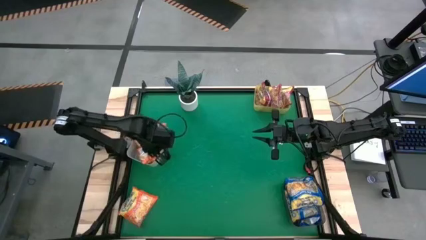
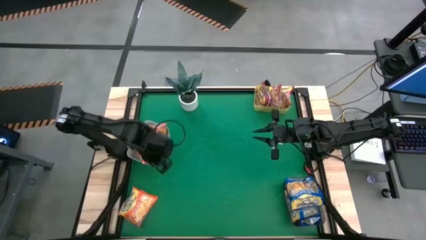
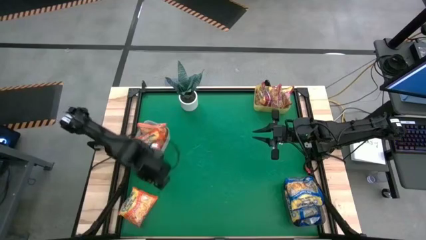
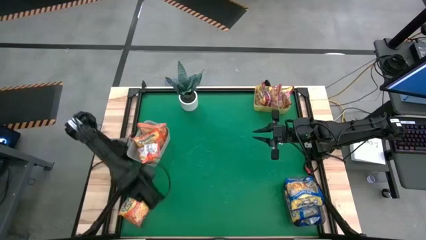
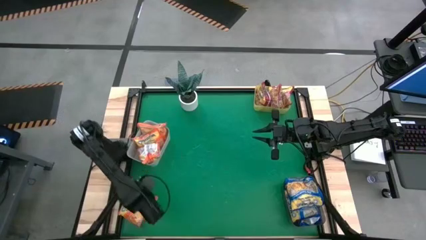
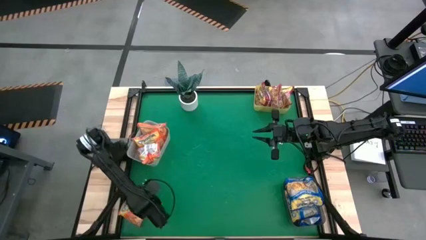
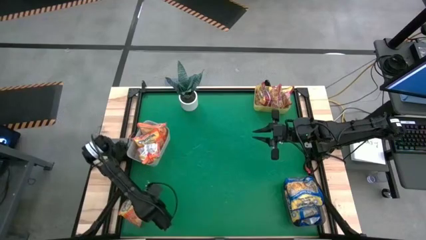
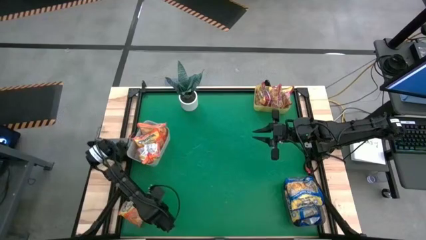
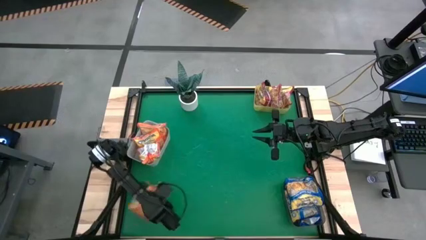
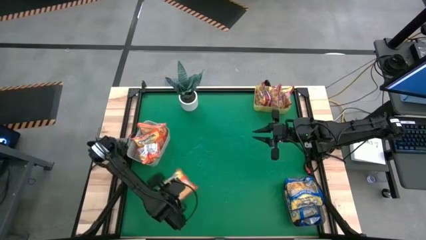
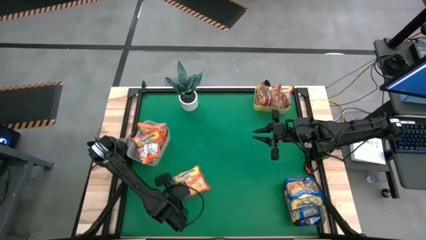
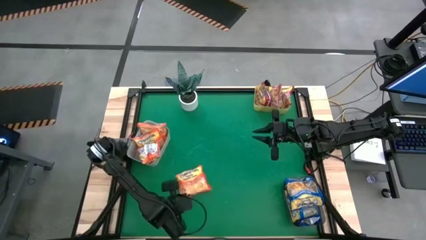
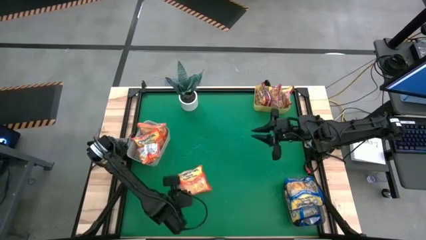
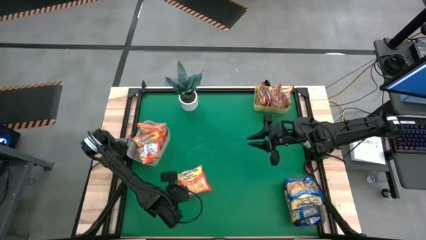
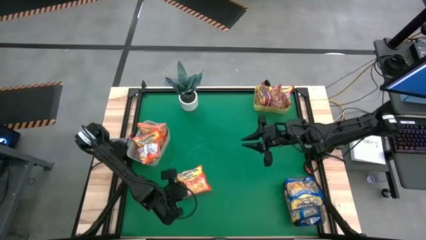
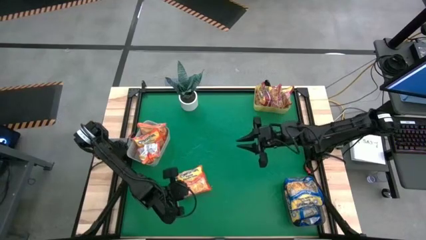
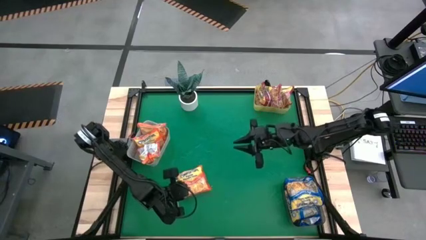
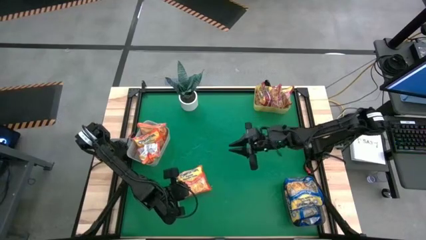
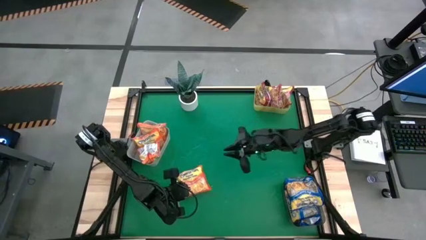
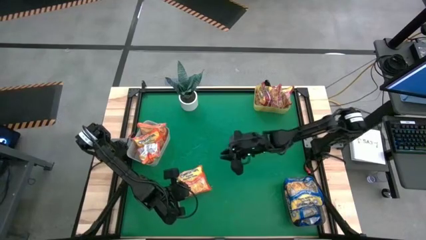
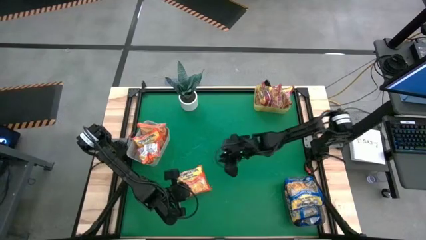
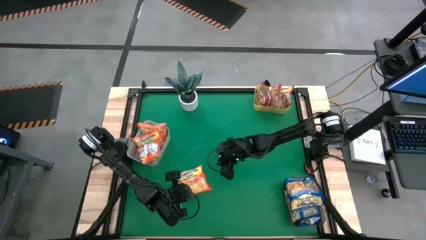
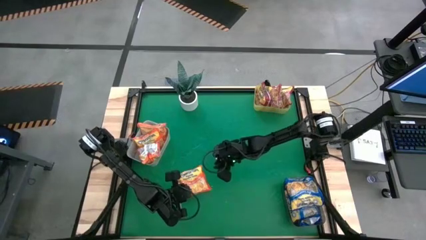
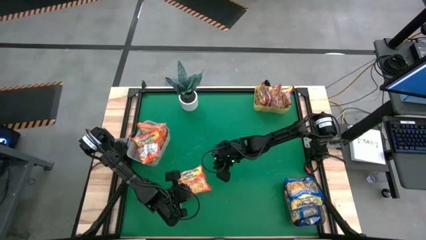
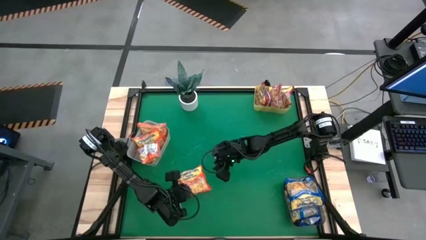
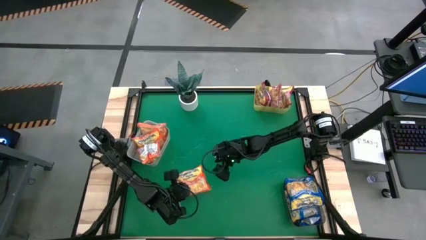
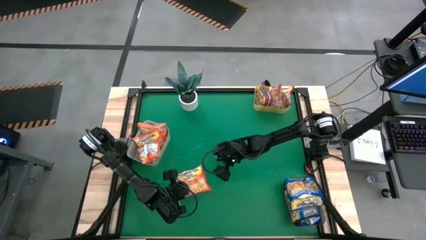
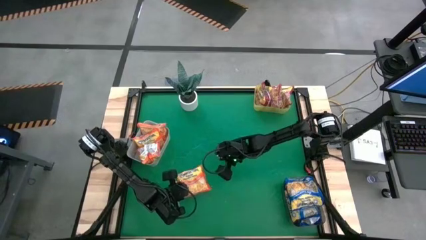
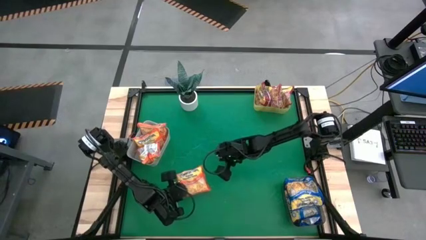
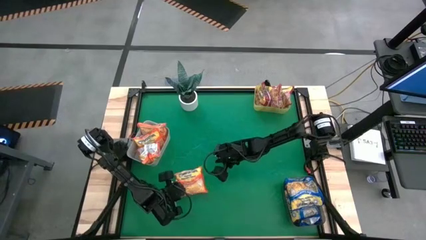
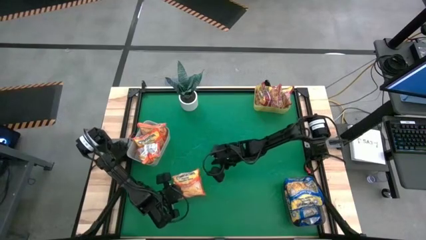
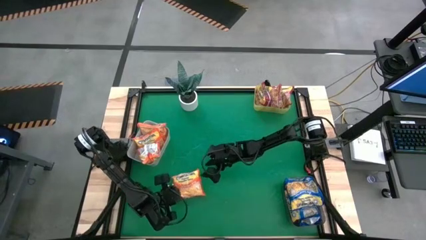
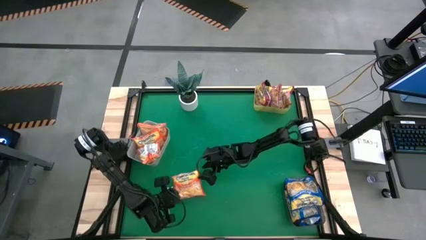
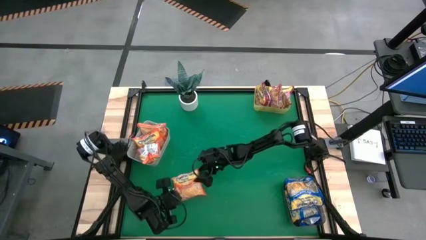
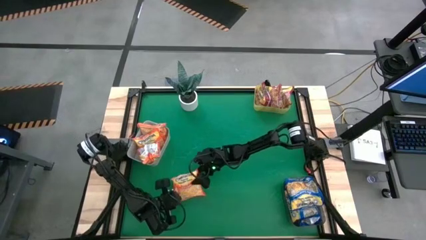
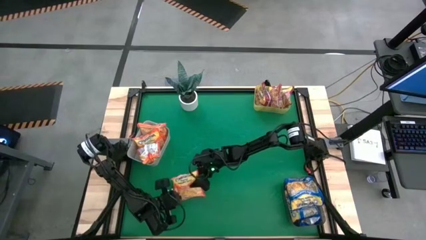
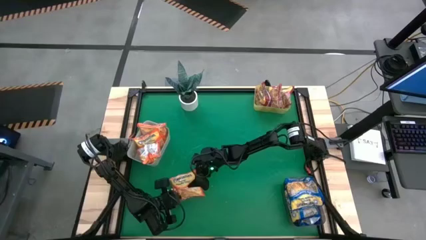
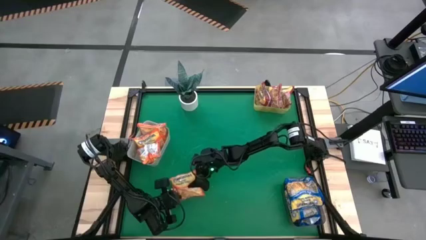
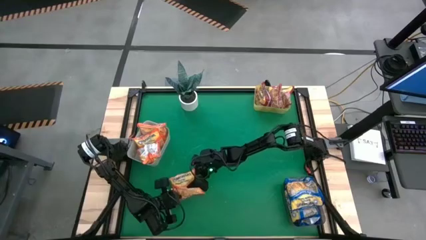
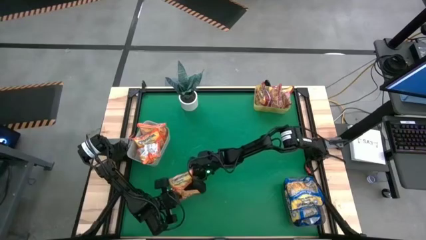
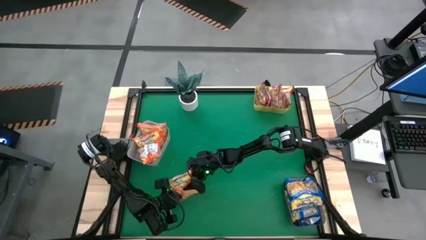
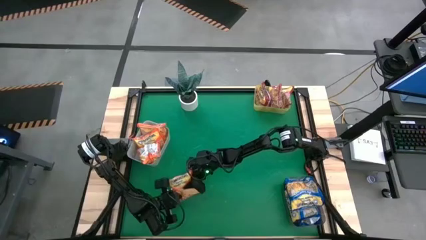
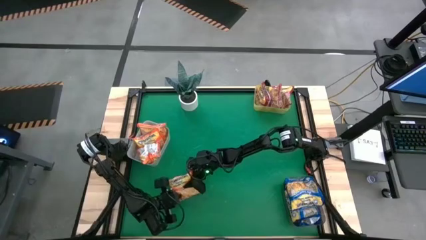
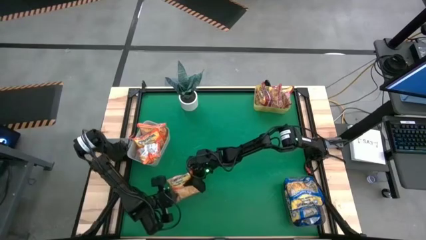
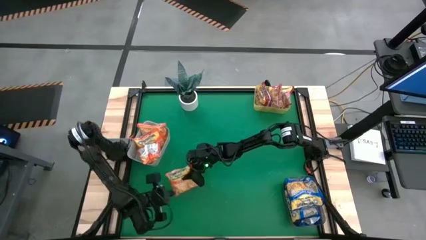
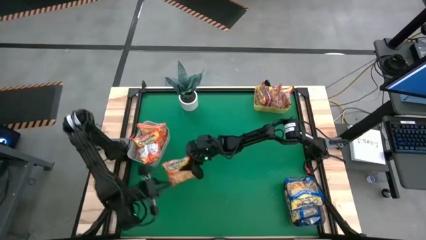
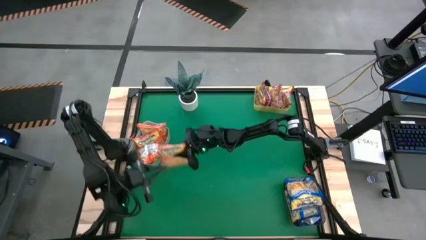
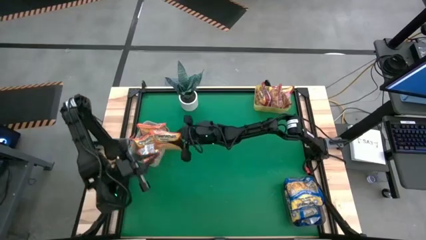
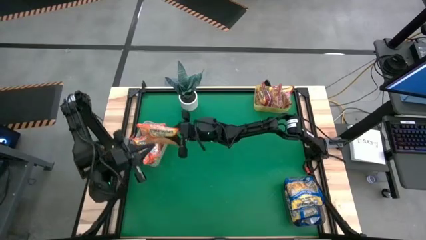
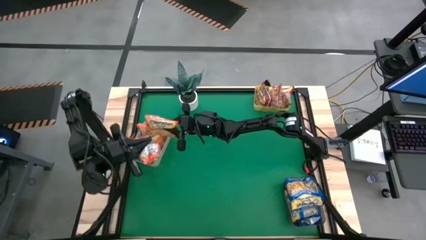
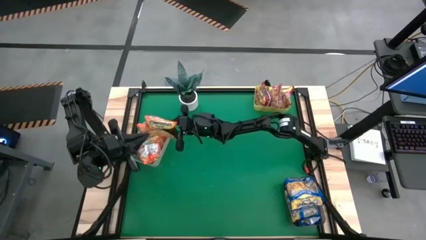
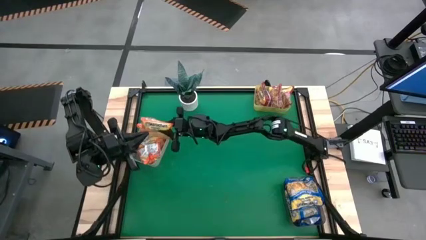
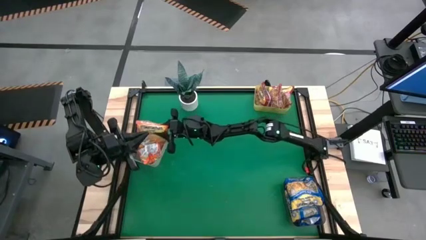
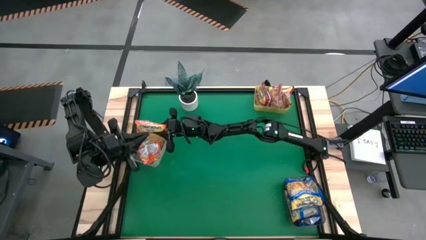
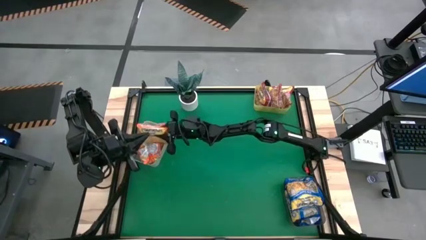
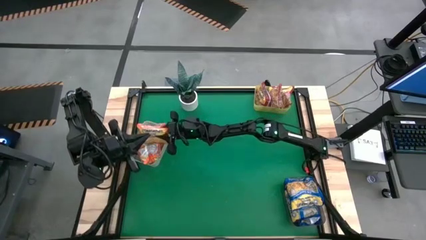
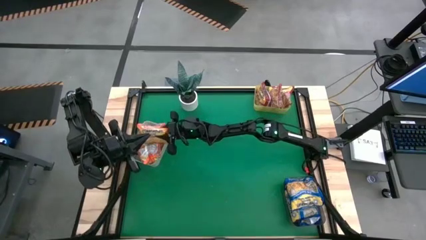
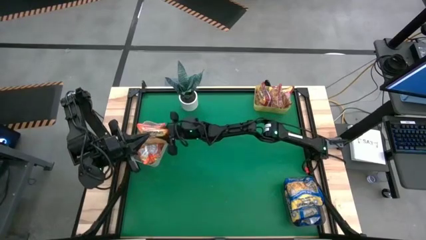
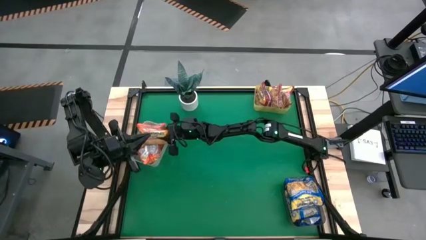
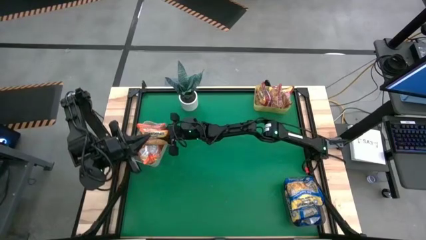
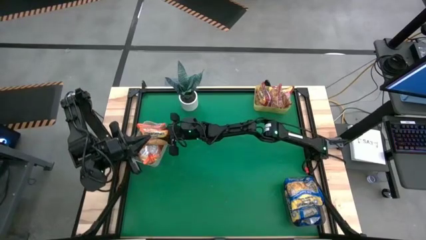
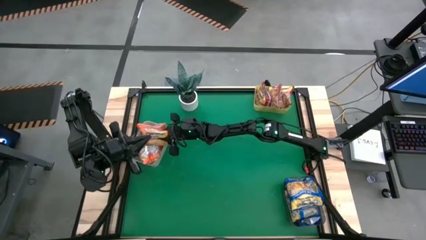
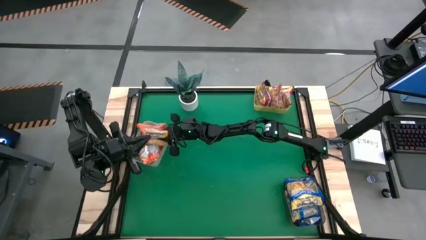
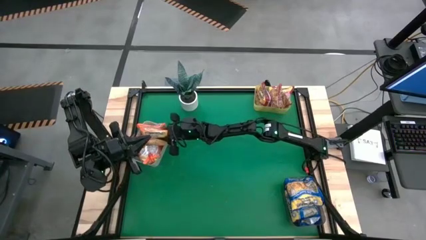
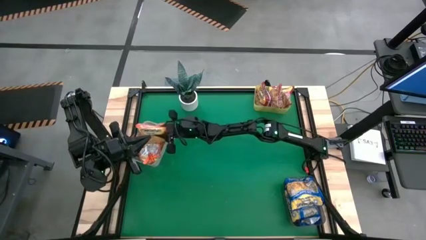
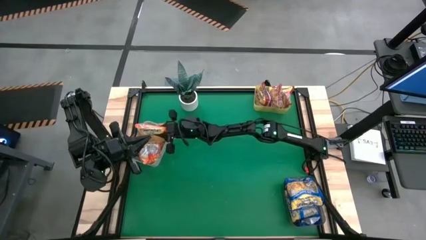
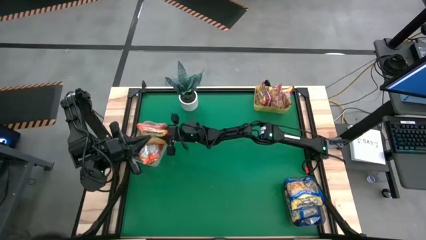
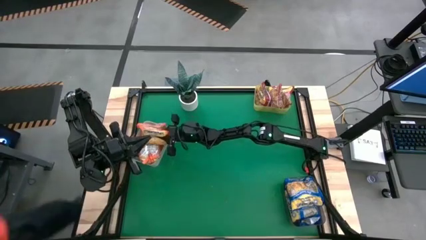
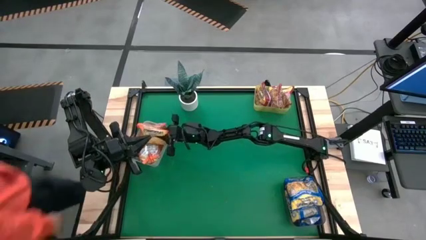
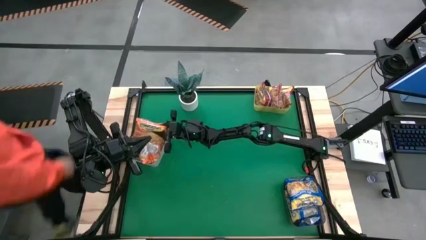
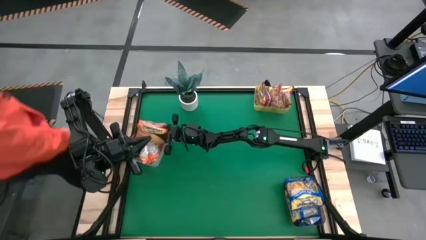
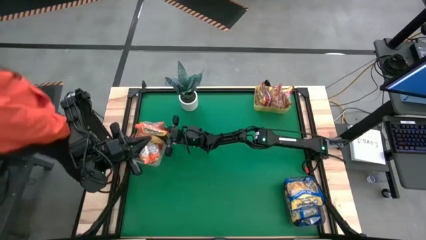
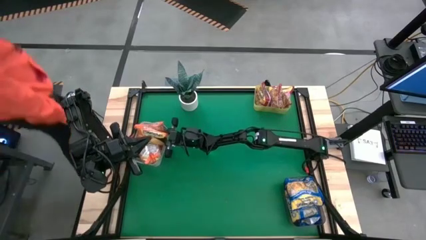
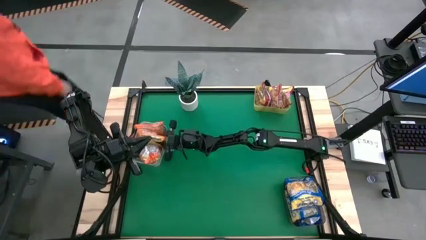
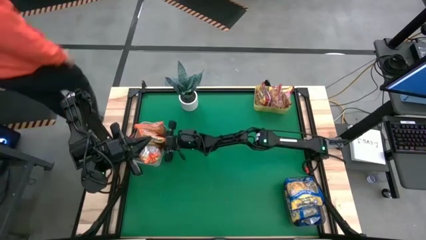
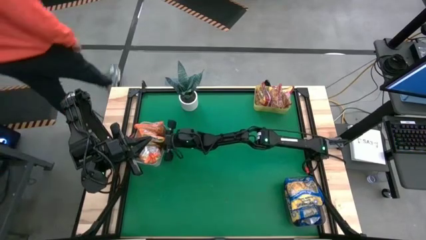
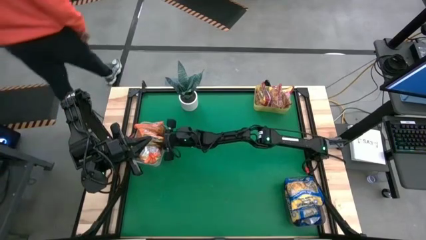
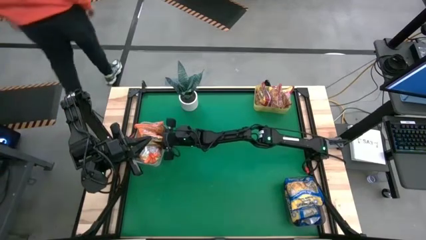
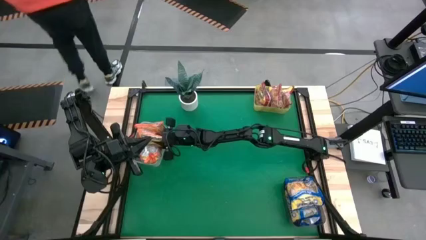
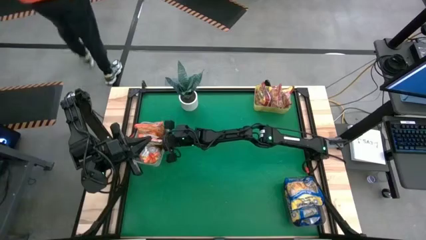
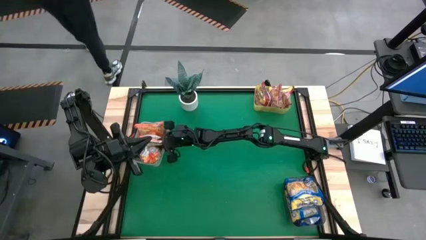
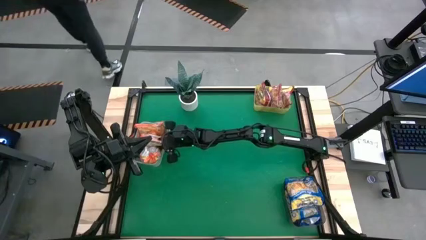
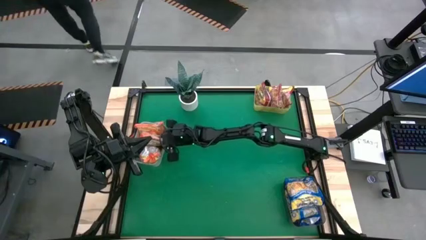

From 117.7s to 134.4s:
Task: Sort Maruchan noodles
Put the orange noodle pack into the white bin

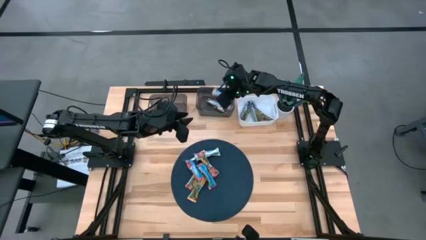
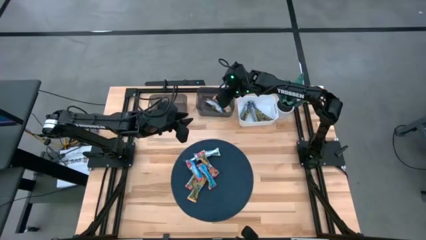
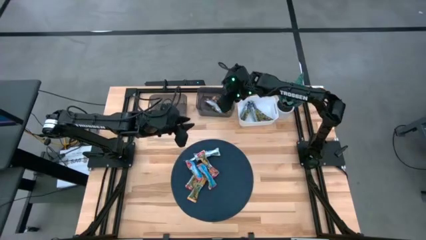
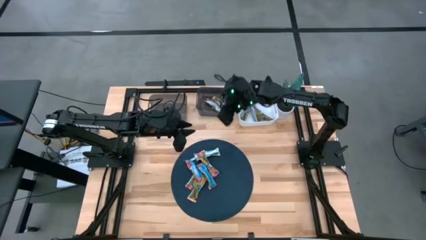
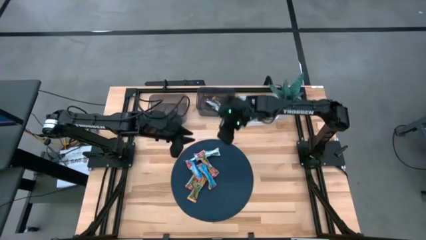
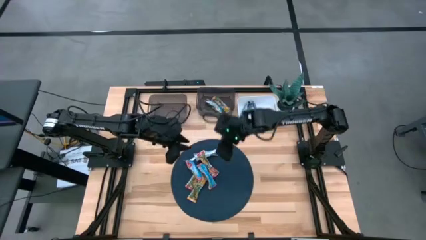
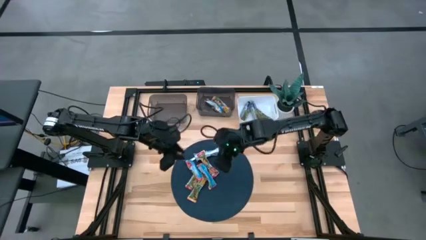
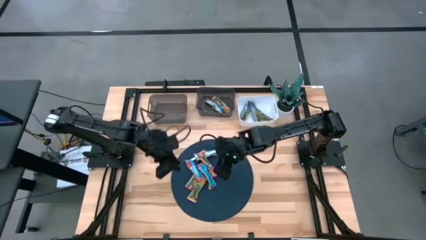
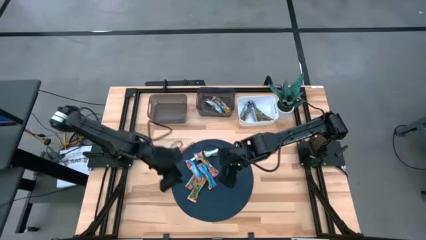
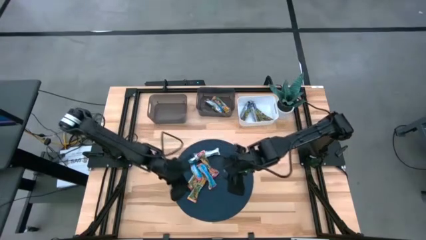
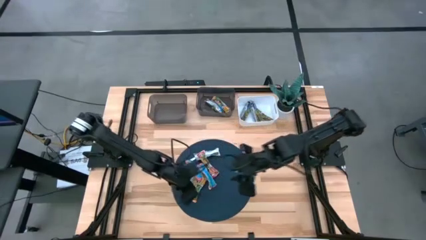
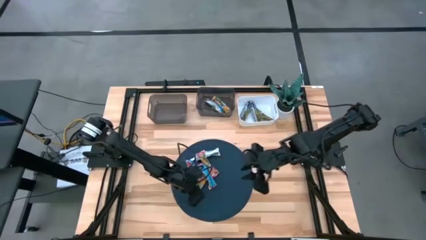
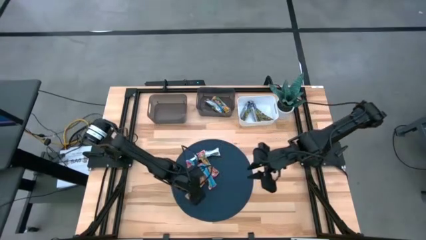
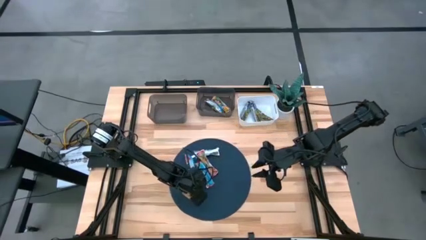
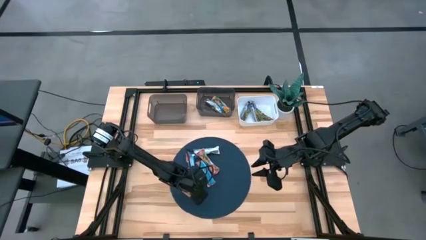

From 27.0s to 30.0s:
Task: Pick and place Granola Bars by type
Put the yellow granola bar into the right black bin
